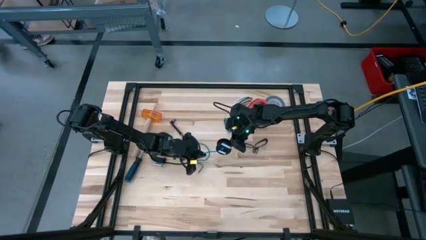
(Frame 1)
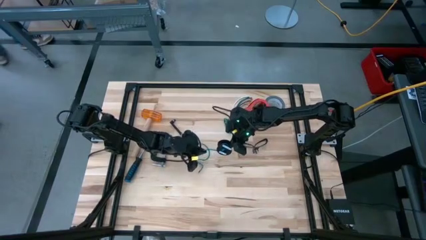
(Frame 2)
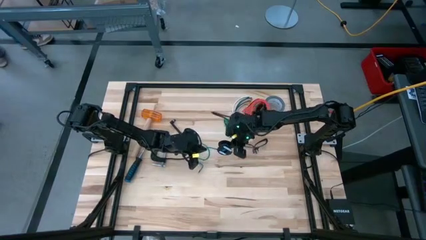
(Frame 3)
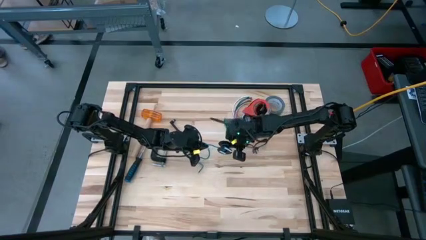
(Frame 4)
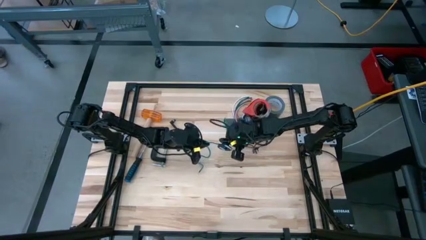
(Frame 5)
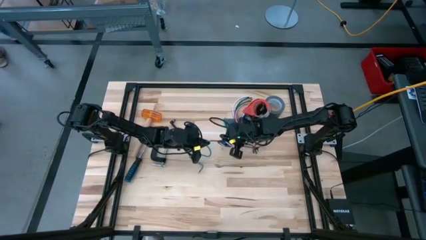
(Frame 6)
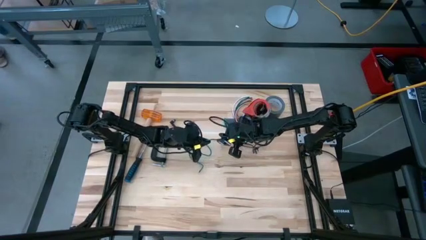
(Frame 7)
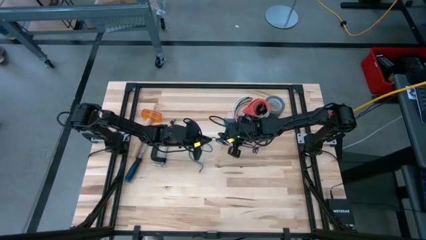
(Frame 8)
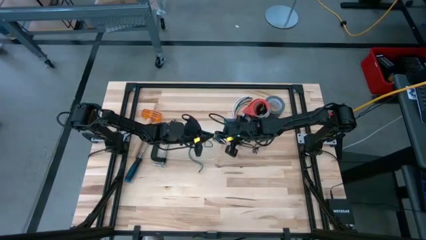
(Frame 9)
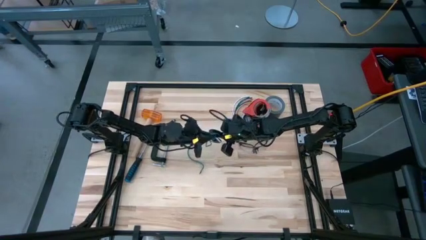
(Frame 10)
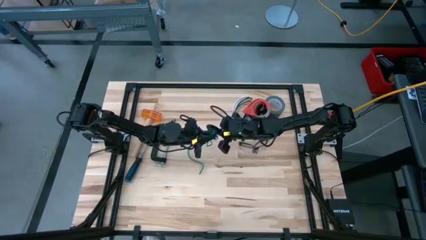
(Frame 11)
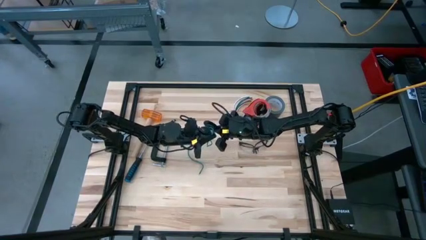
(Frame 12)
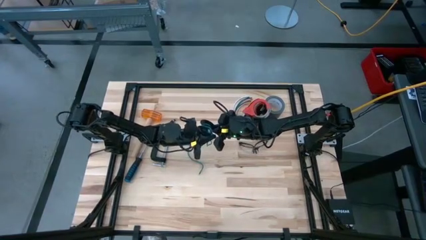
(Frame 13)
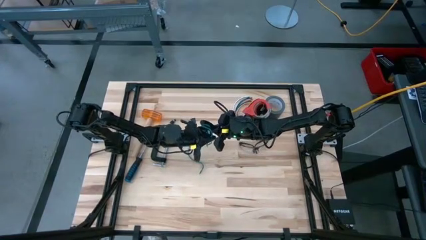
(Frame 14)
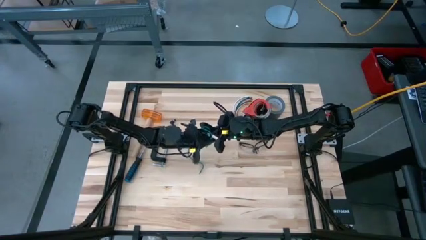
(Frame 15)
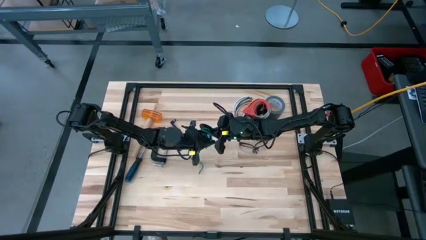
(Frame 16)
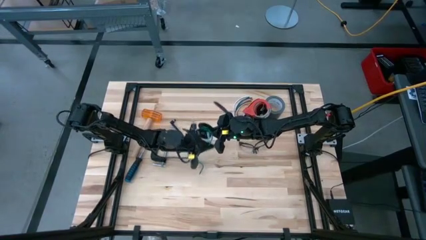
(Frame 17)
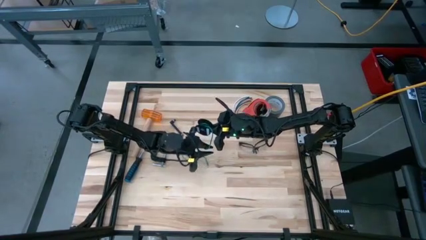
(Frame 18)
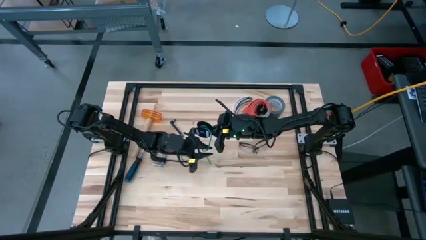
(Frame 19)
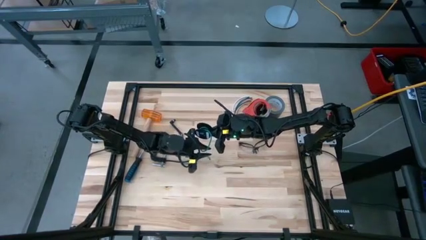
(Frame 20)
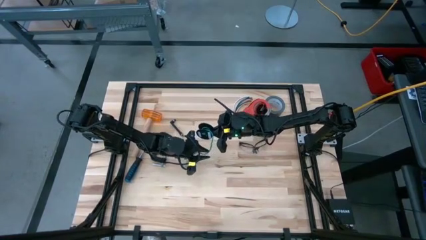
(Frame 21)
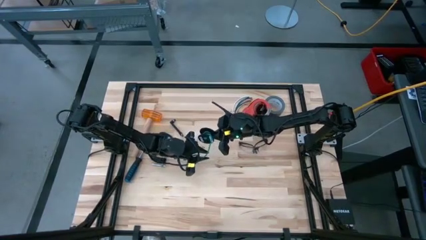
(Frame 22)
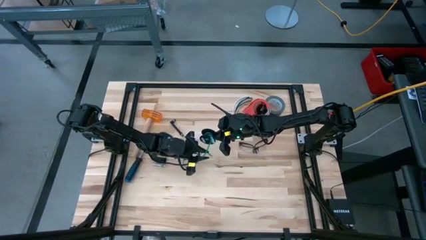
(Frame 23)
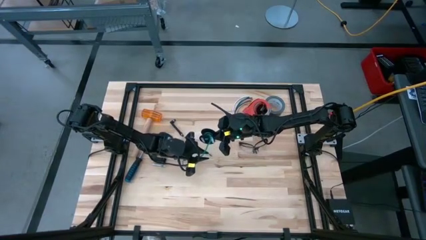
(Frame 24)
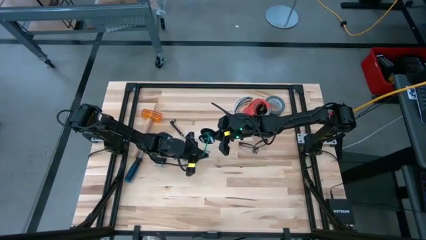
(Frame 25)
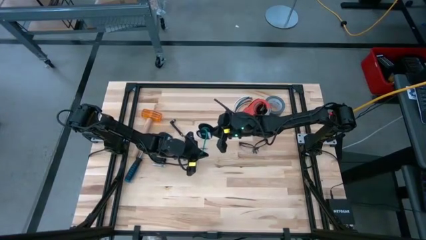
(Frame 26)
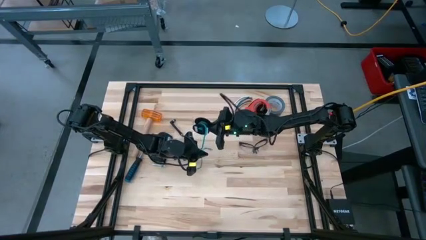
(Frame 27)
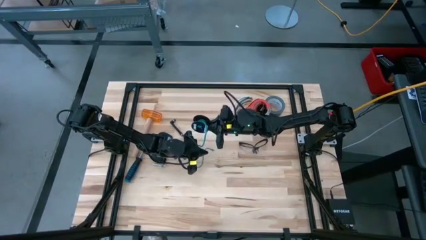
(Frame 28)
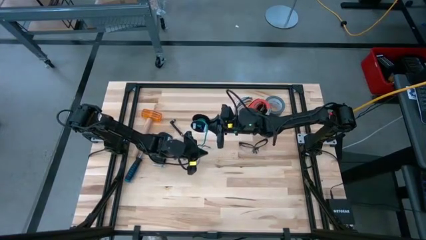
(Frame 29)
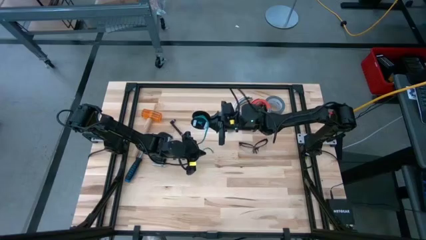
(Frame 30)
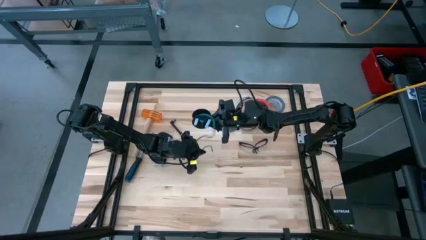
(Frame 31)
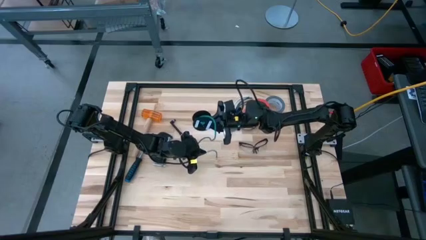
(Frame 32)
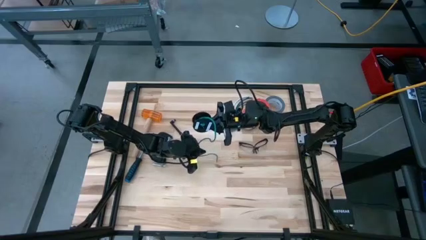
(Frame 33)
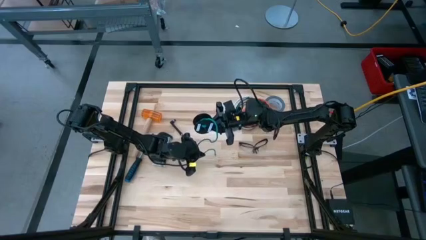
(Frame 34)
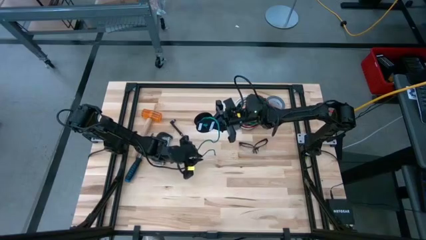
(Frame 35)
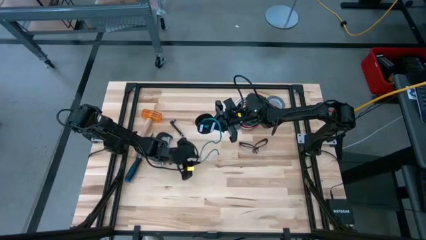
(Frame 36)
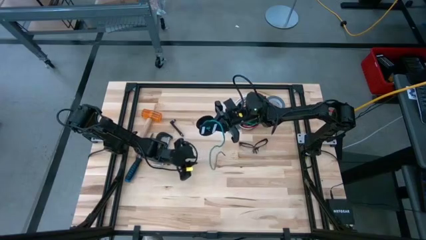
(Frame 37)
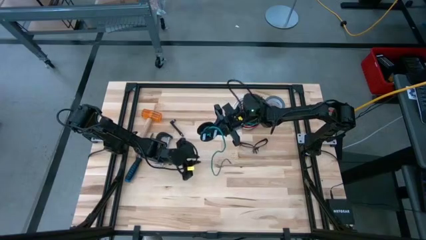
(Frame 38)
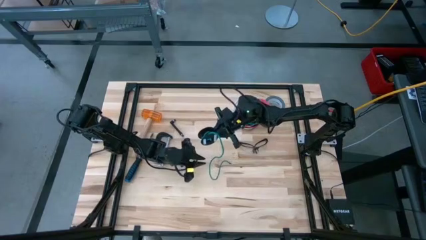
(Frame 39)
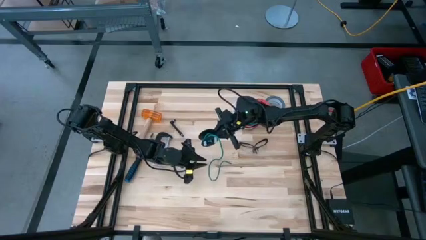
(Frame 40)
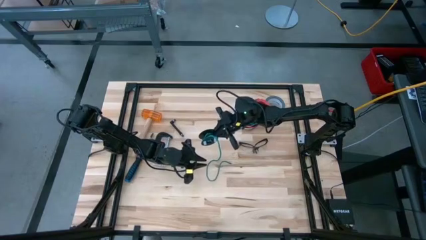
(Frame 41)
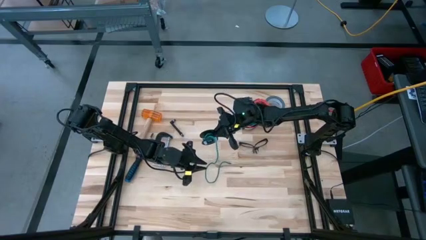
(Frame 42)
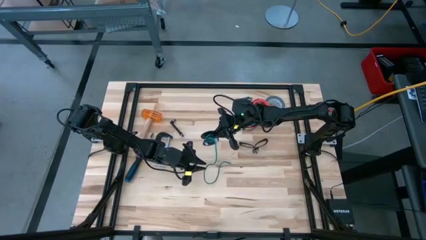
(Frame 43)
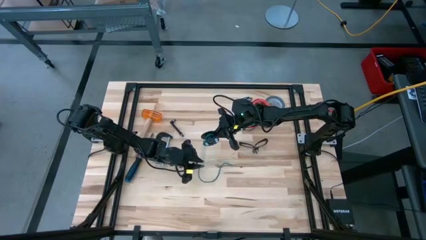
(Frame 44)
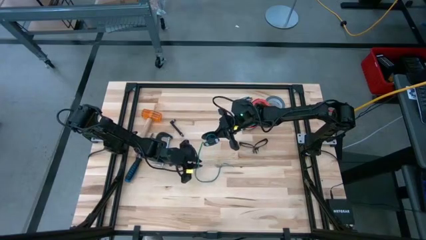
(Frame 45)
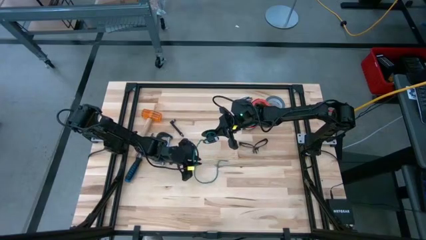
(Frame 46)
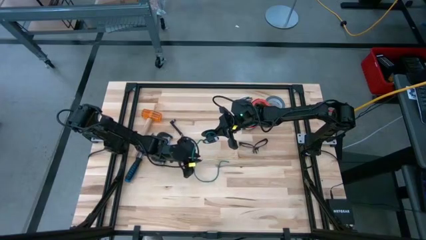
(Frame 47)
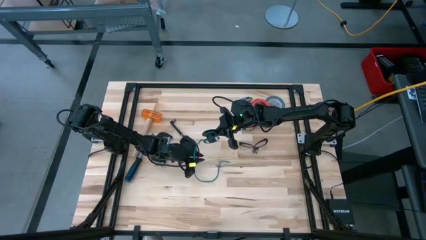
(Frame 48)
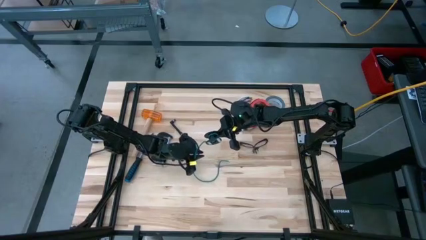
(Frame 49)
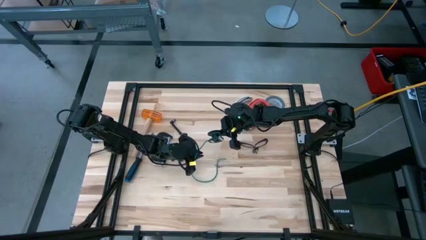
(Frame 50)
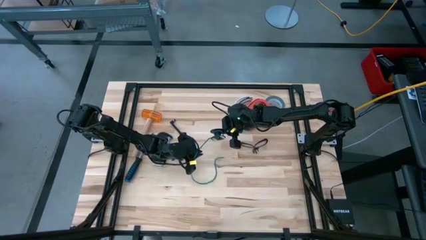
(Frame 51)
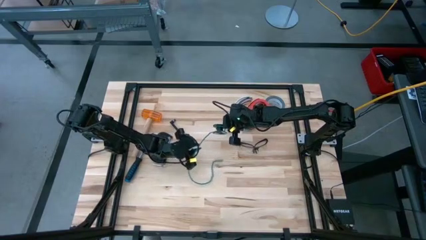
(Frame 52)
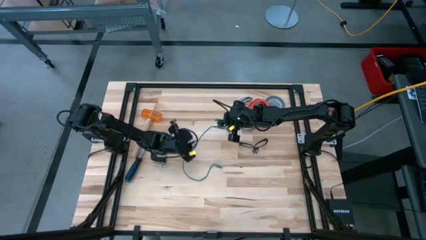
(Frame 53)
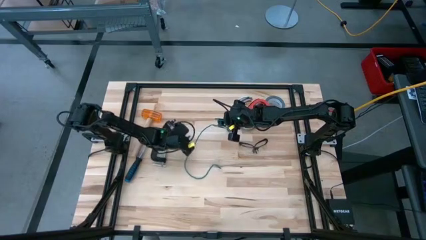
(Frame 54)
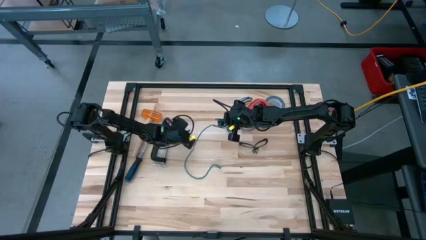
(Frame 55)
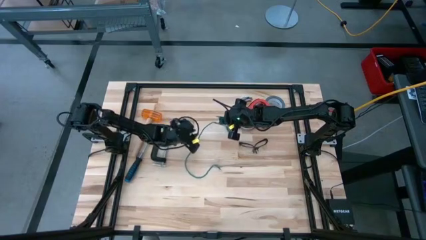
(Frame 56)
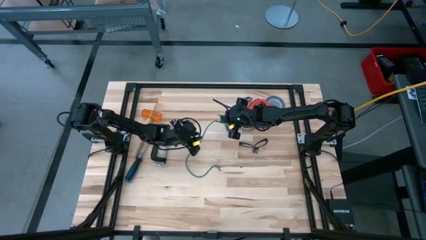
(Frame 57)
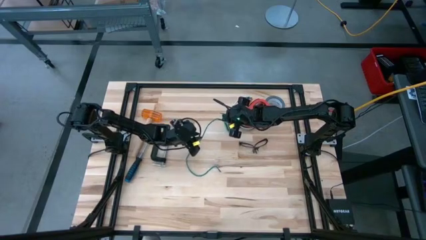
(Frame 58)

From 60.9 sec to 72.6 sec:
Task: Coil cords
Coil the green wire to the spool

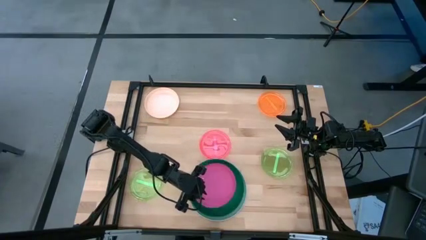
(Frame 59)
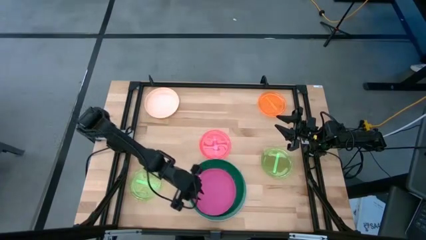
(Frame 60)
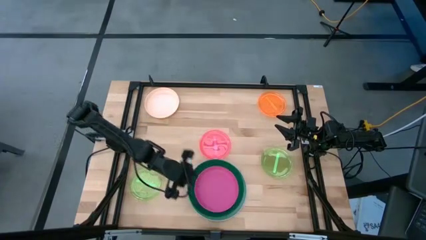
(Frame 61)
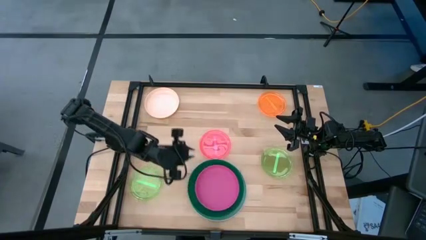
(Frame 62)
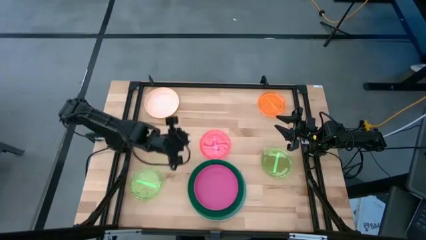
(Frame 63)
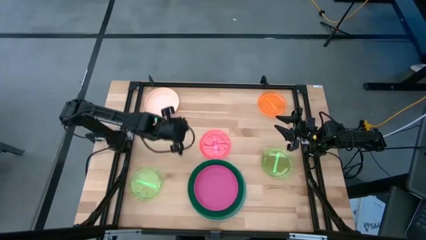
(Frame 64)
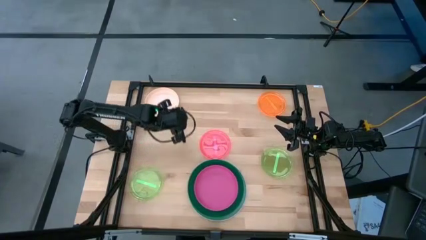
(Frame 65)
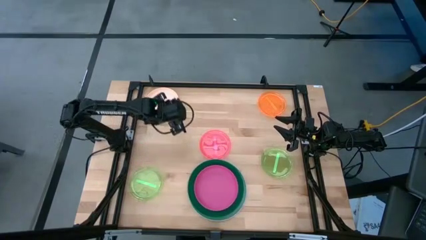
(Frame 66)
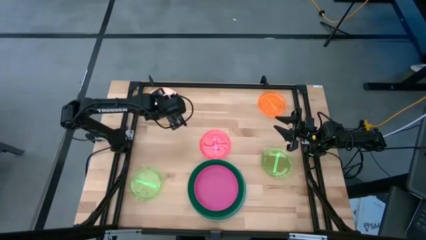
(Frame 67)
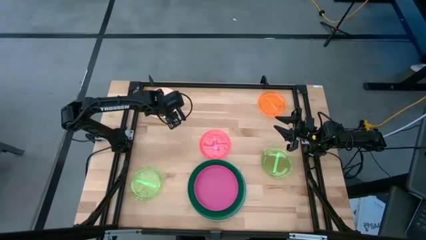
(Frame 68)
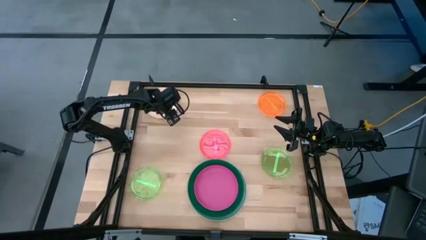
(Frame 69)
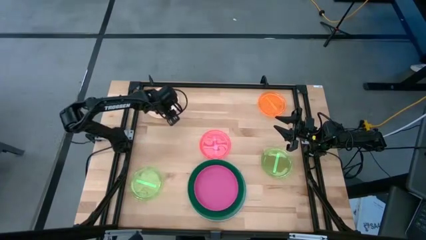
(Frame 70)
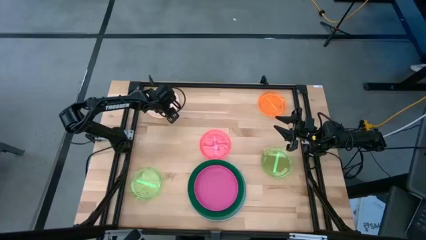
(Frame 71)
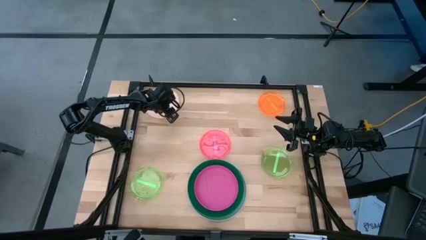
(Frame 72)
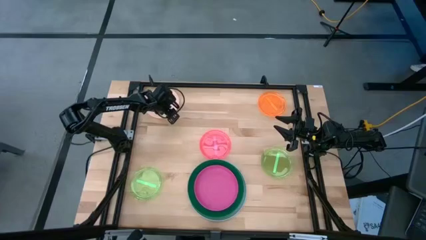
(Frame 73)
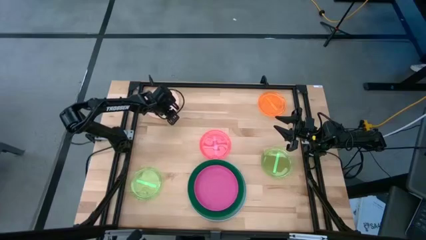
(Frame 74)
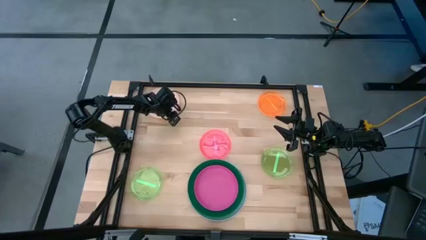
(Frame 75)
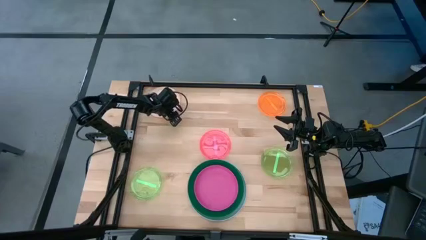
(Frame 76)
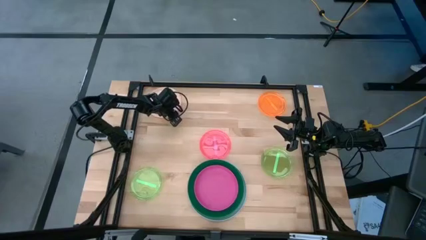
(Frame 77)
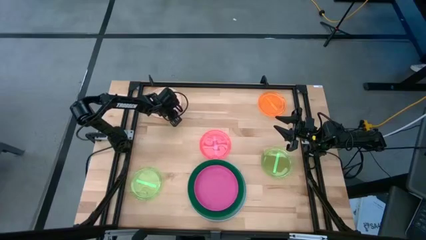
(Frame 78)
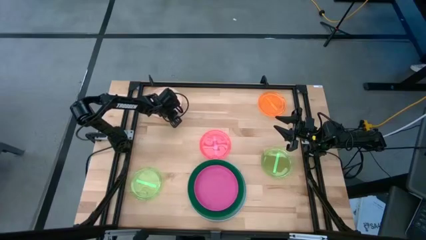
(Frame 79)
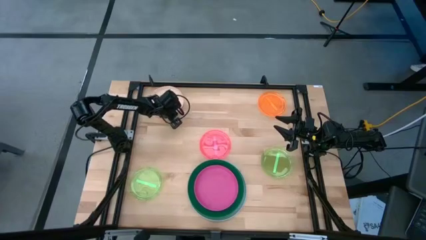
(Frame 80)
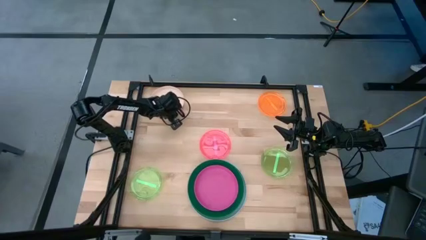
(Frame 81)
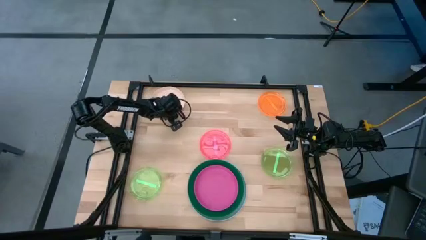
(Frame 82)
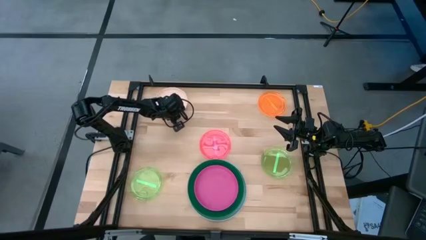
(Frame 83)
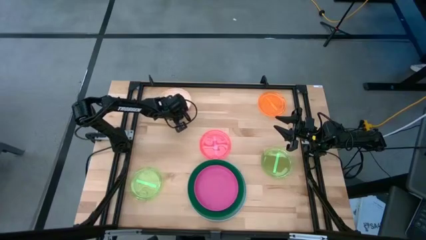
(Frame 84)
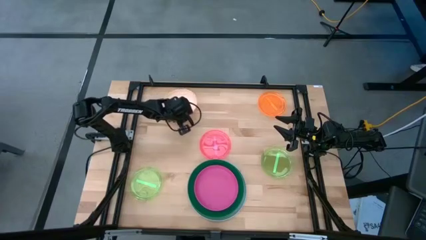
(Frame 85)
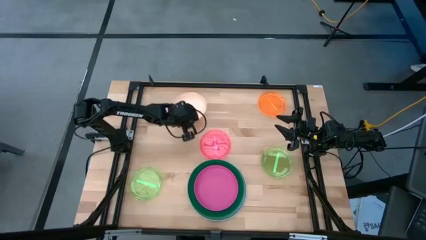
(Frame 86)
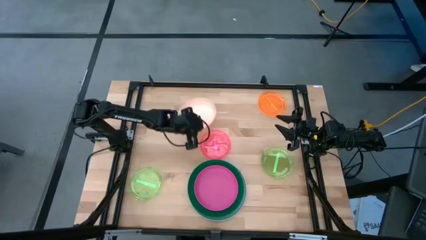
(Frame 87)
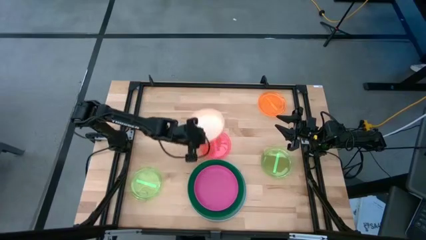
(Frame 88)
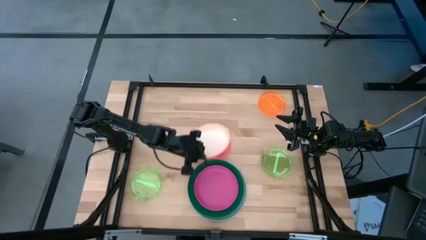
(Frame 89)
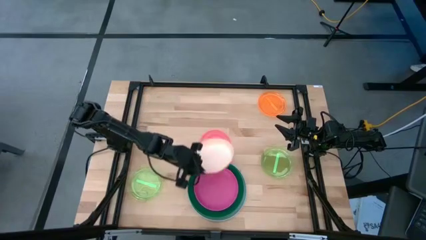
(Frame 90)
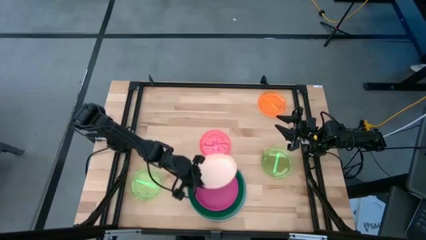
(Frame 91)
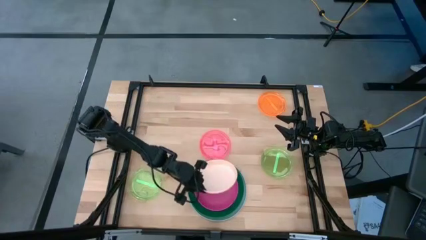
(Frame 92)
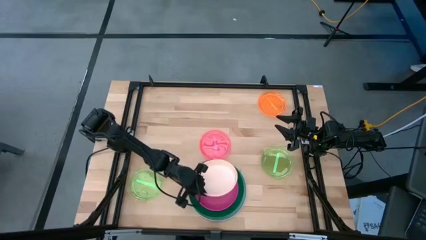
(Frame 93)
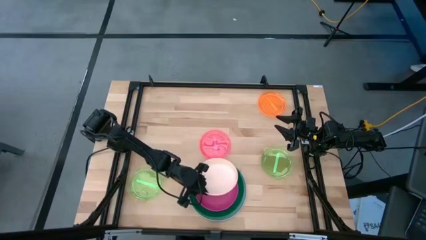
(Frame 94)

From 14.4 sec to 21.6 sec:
Task: Stack plastic plates
Stack the cream plate on the pink plate
